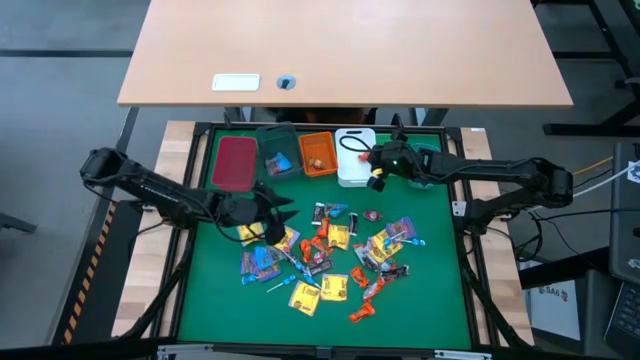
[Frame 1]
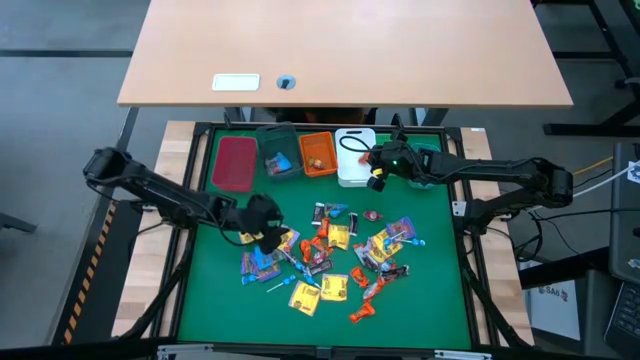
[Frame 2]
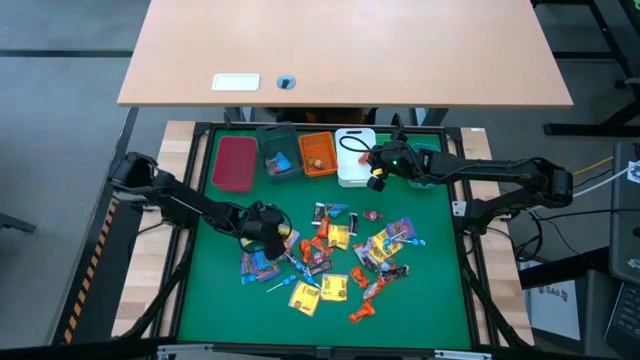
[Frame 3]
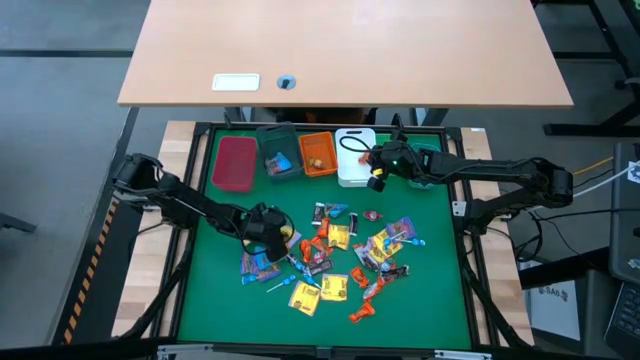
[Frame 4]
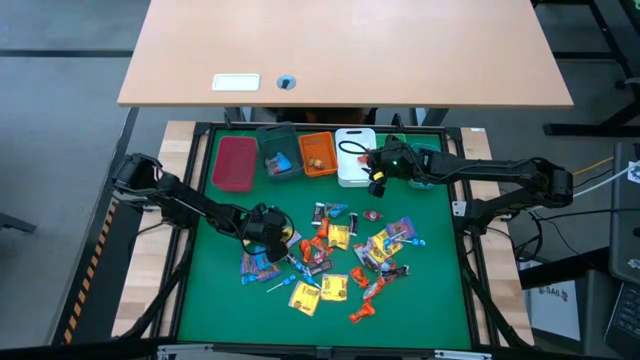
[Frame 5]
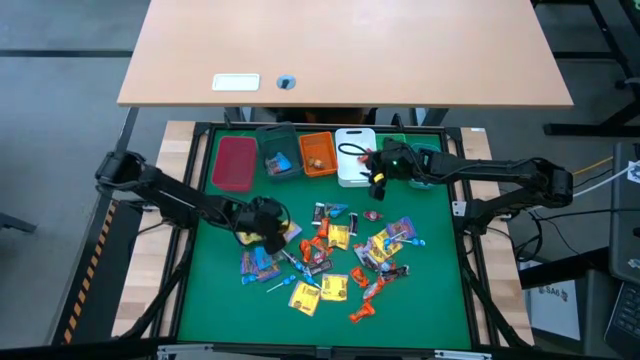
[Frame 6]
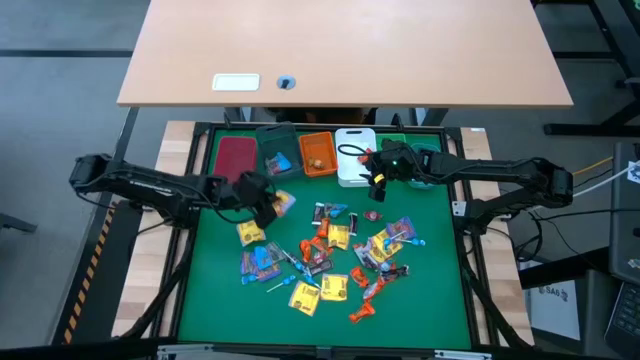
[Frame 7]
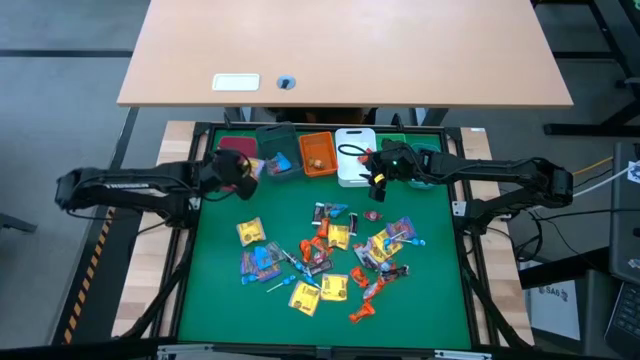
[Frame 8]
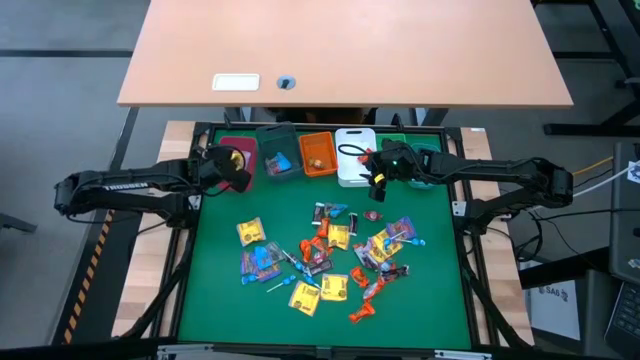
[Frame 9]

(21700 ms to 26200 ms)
Task: Sort candy
Put the yellow candy into the red bin

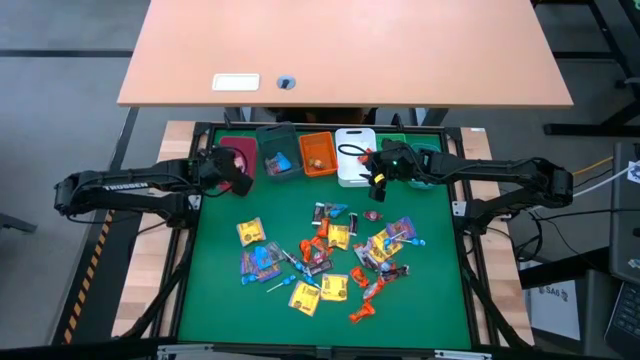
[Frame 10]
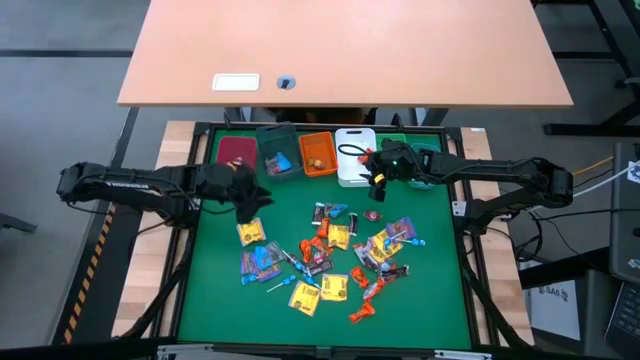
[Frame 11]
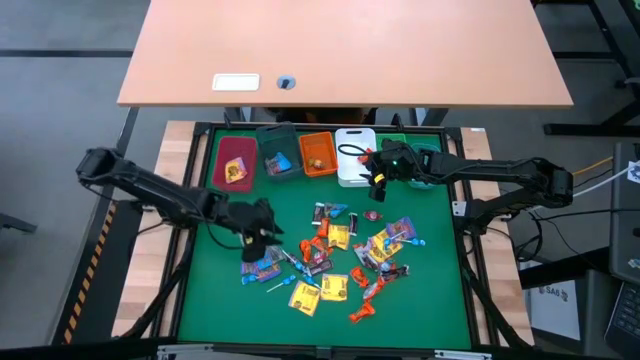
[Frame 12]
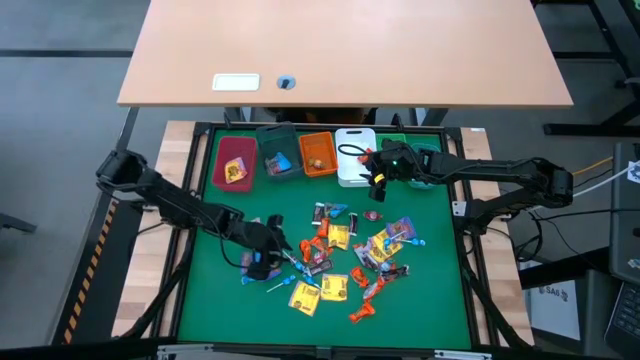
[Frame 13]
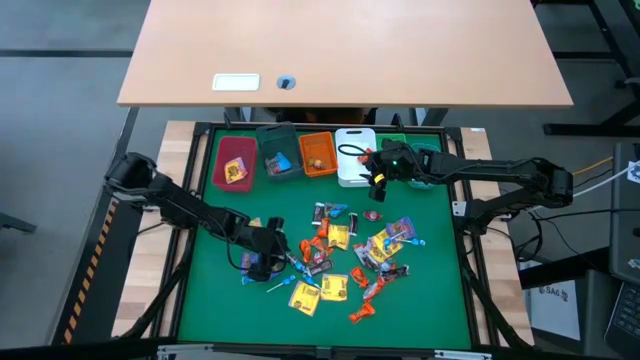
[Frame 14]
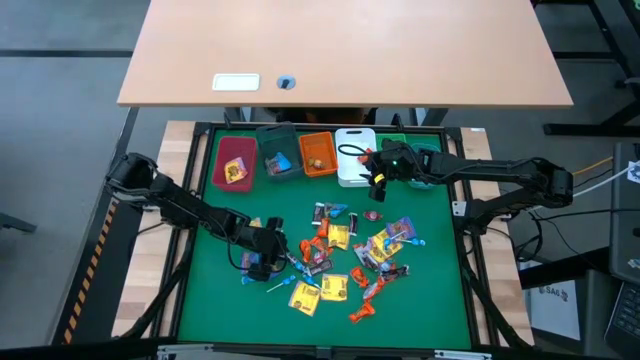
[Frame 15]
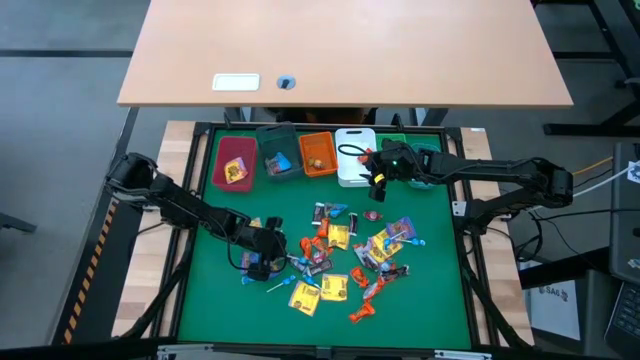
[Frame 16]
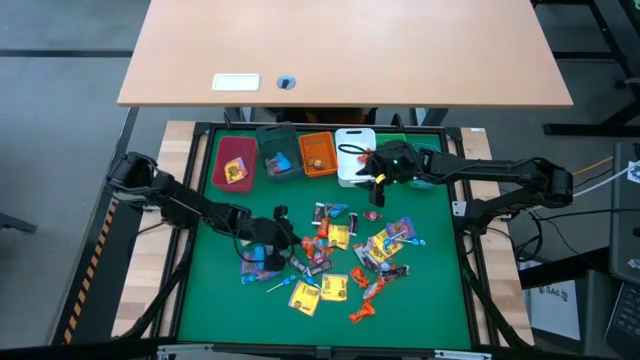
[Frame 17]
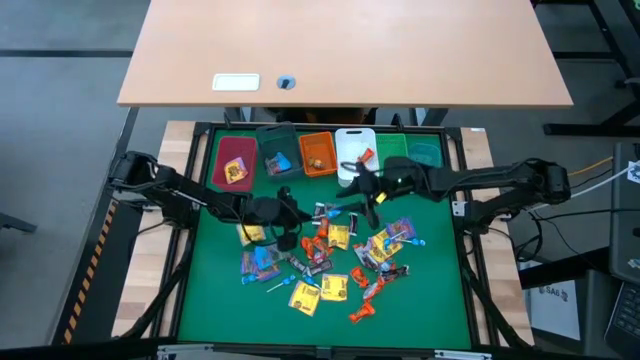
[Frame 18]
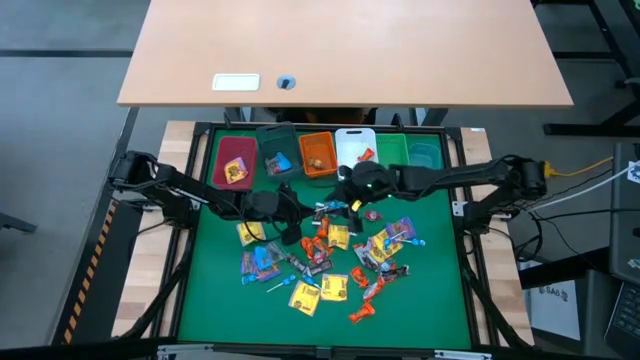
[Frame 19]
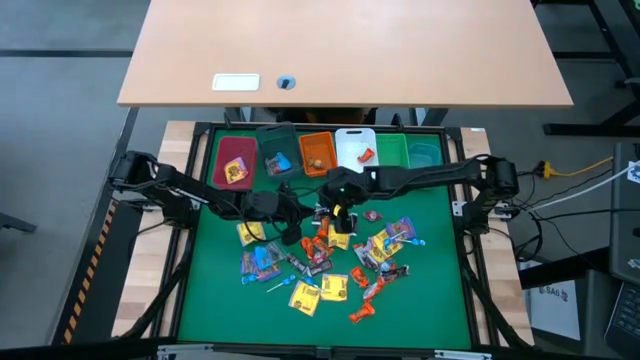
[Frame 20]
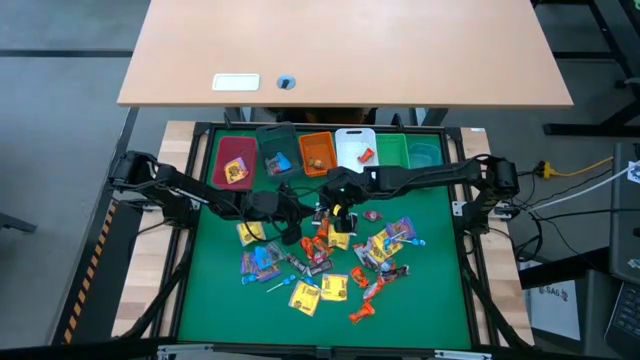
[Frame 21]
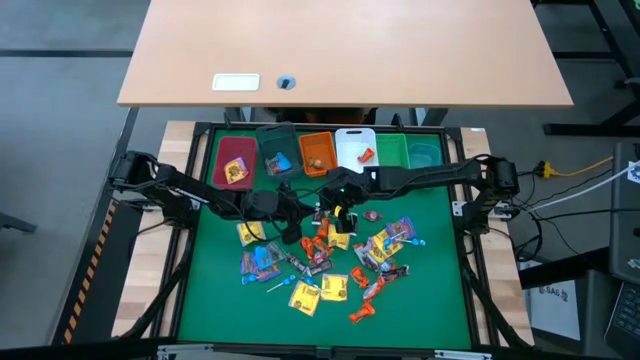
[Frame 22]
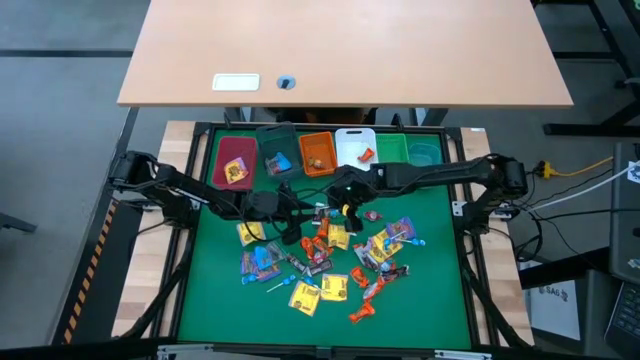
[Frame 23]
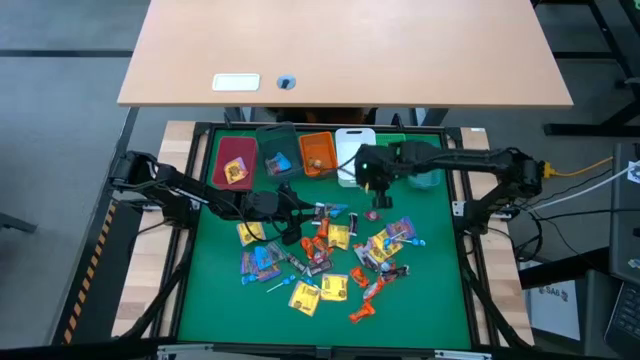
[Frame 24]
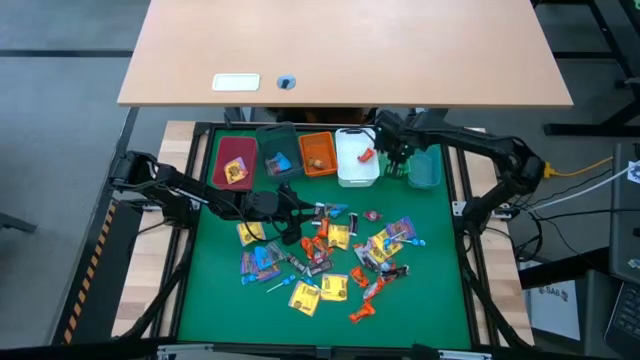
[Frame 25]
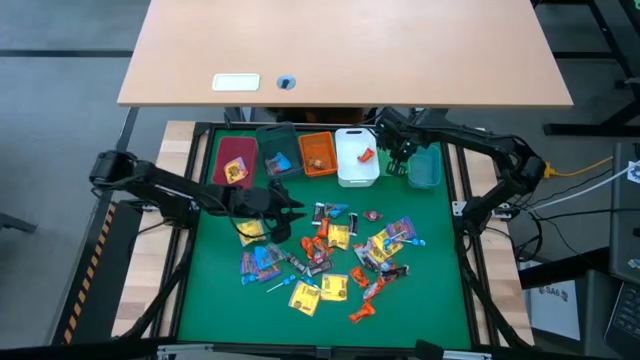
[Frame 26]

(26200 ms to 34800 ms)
Put the blue lollipop into the green bin

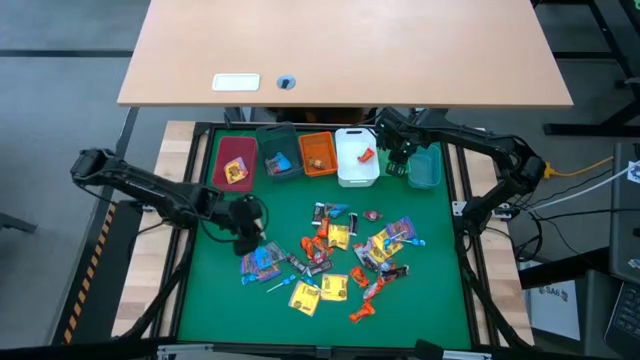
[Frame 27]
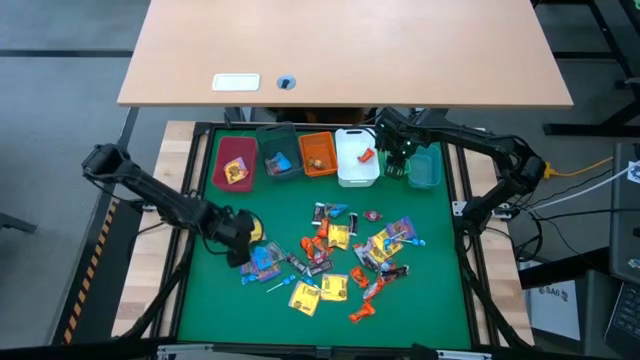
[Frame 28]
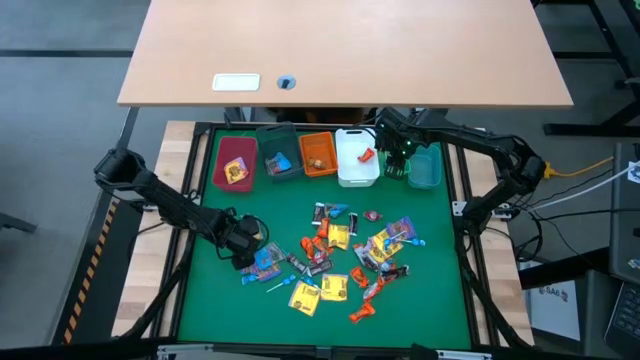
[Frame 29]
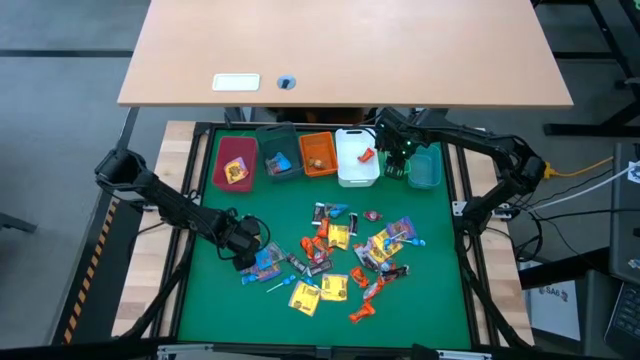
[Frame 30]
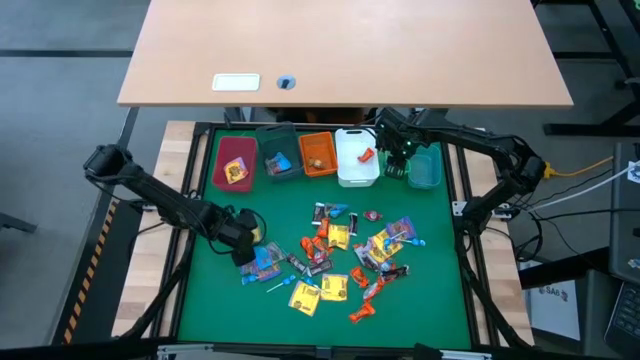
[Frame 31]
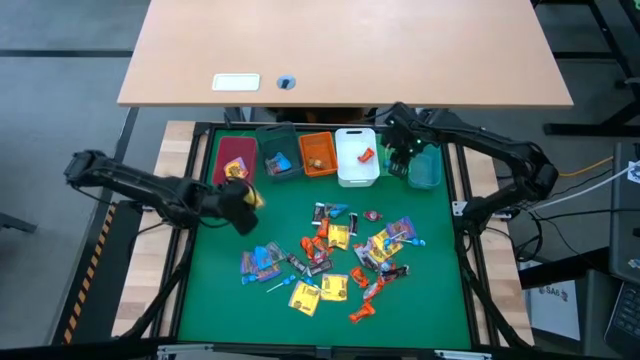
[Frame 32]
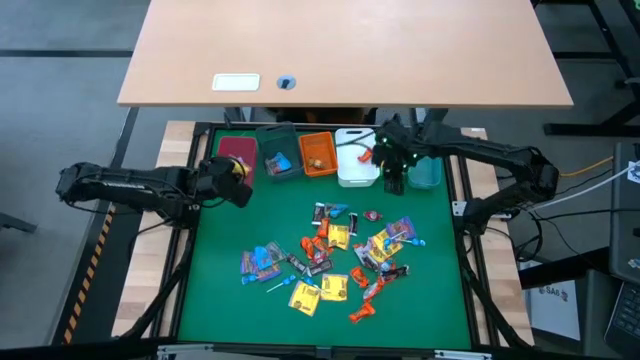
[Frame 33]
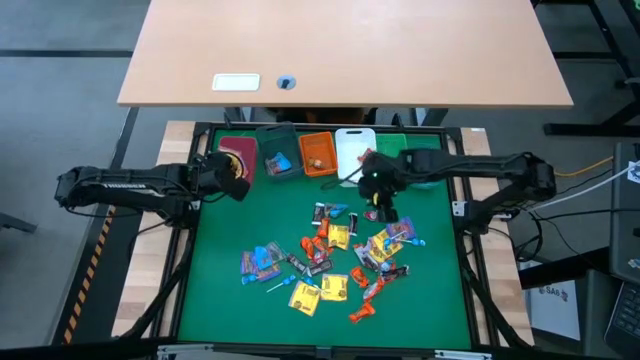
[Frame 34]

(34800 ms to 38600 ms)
Put the yellow candy into the red bin

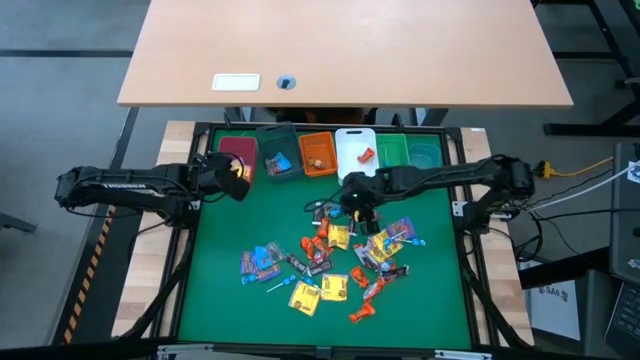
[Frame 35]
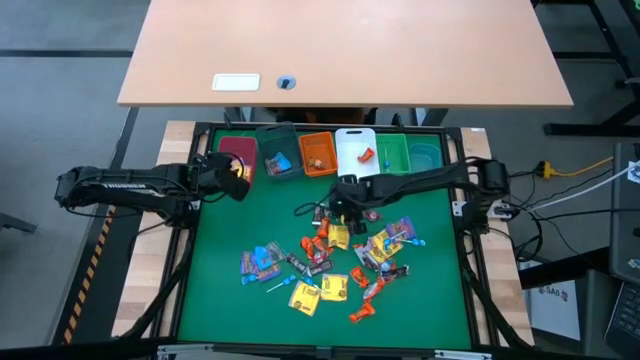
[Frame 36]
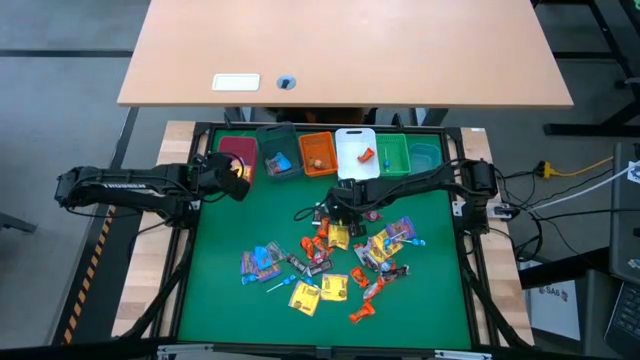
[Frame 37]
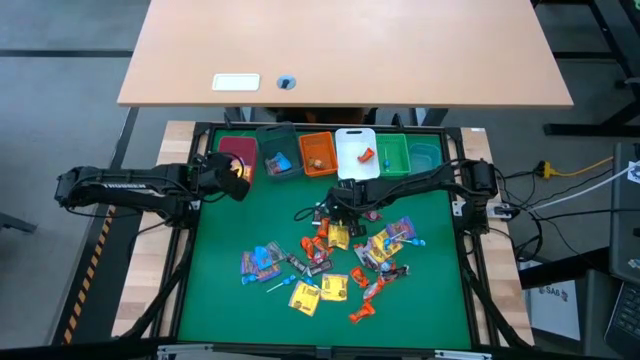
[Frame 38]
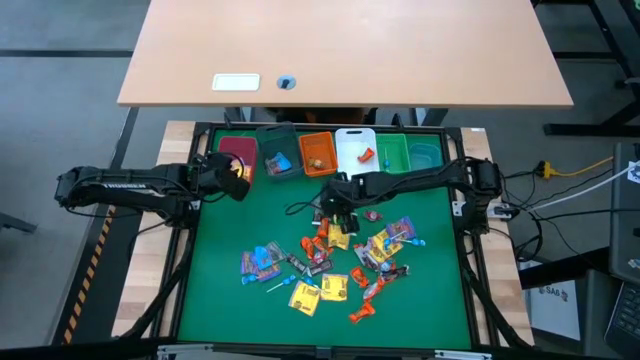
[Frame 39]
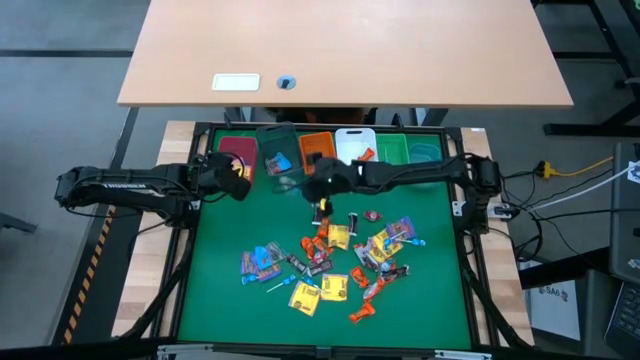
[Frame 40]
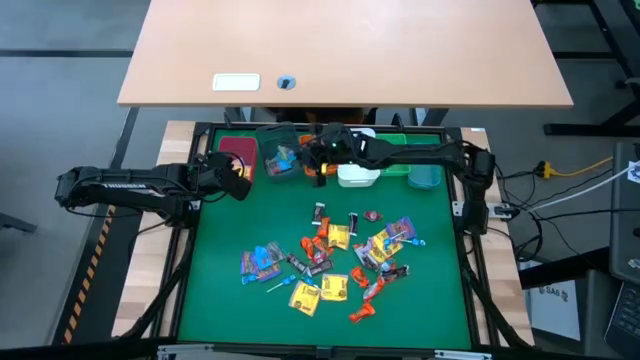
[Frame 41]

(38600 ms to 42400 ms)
Put the blue candy into the black bin
